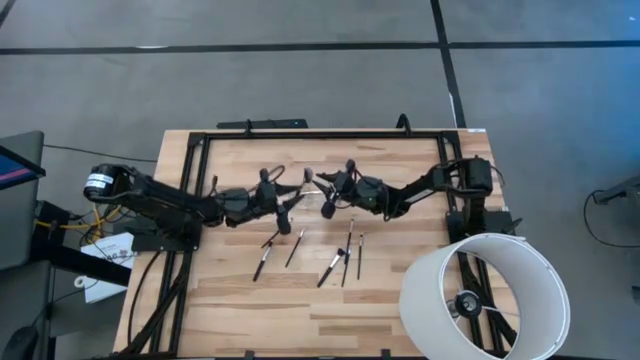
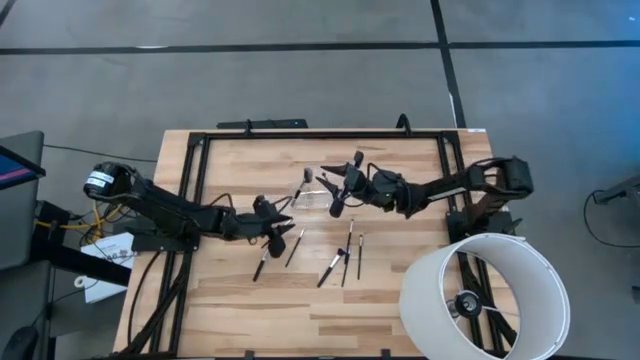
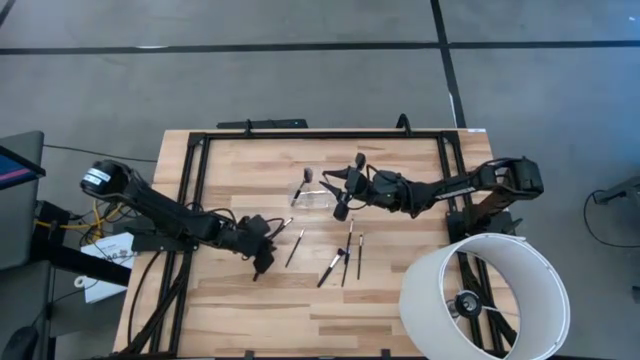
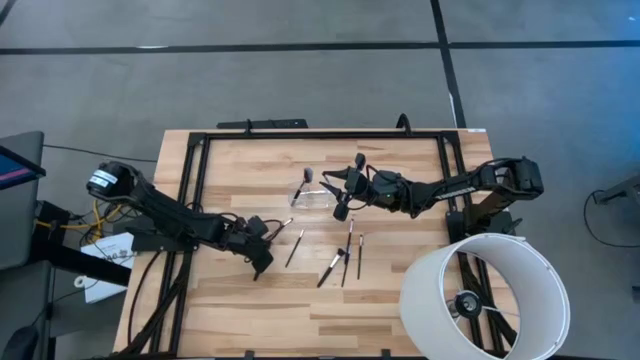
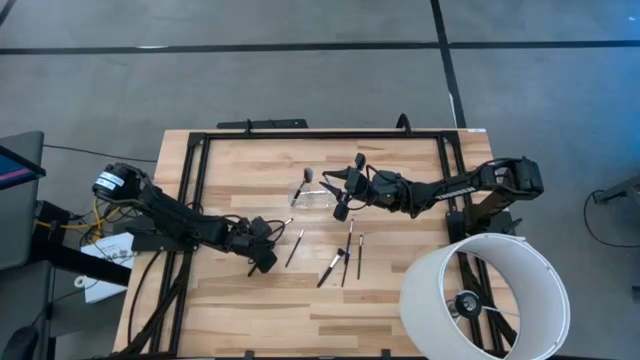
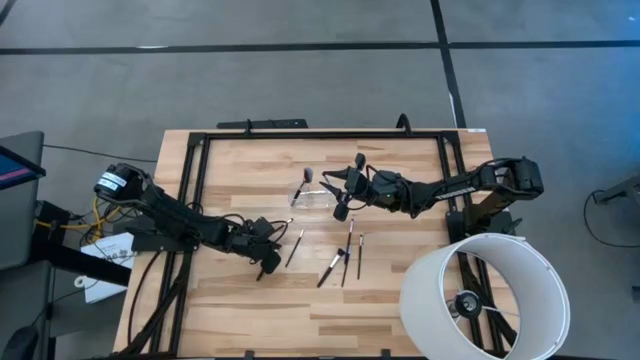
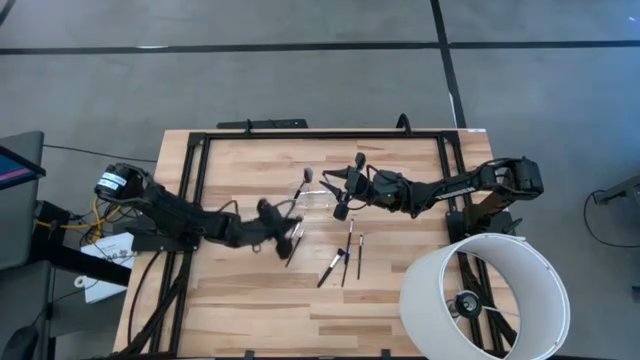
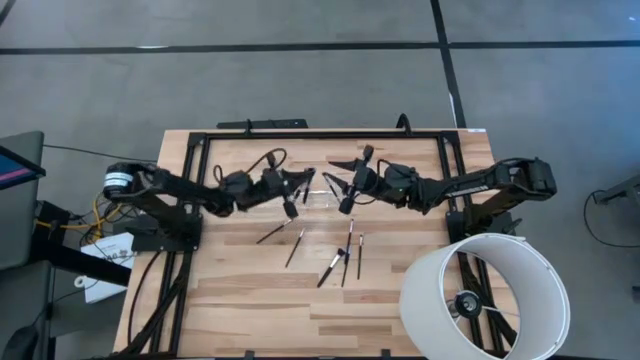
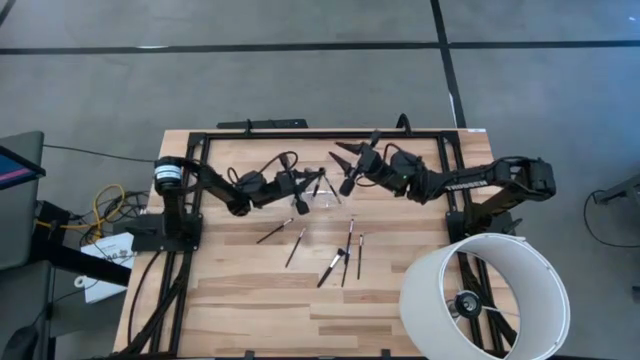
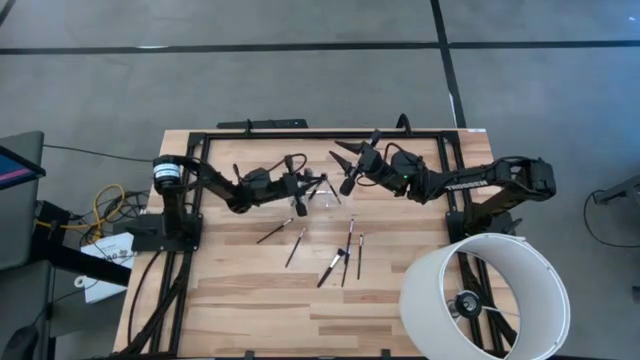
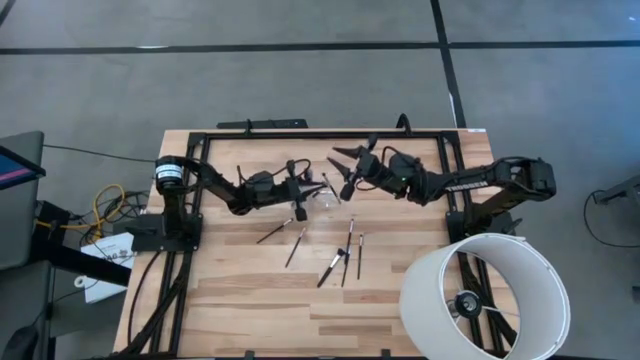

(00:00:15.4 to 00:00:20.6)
Task: Put items in baskets/containers
Put the powder brush into the transparent organizer

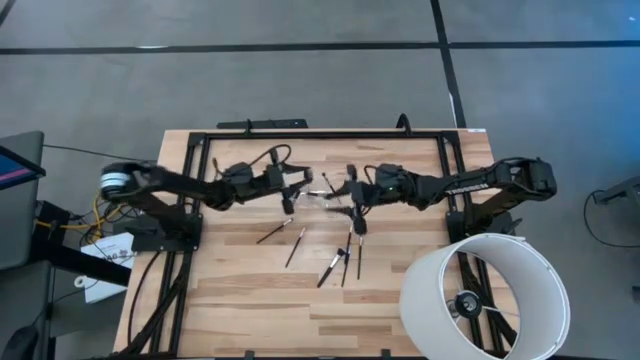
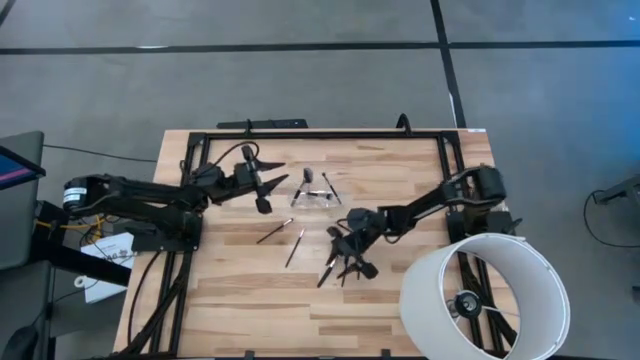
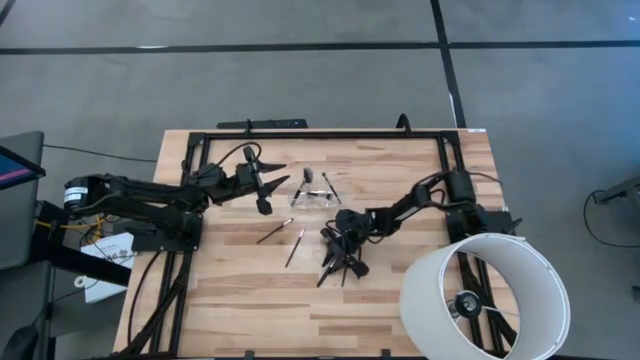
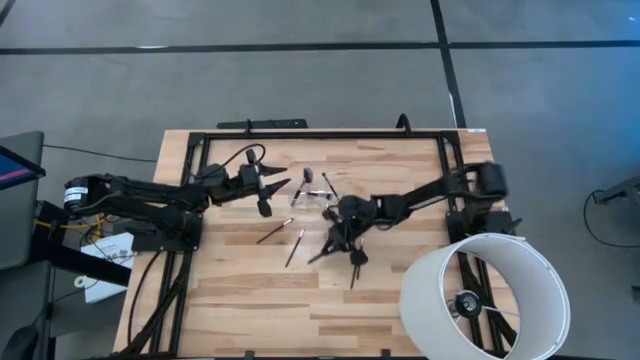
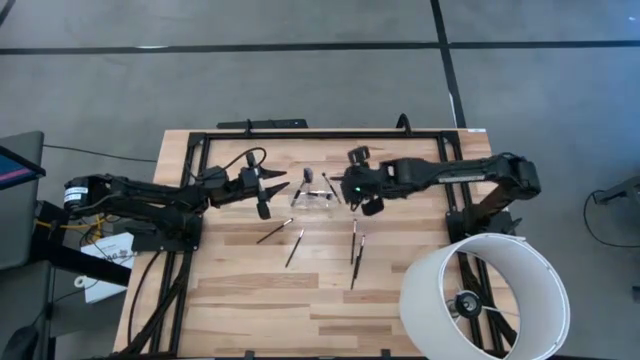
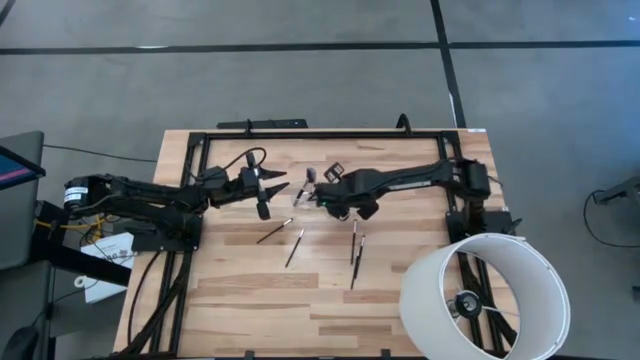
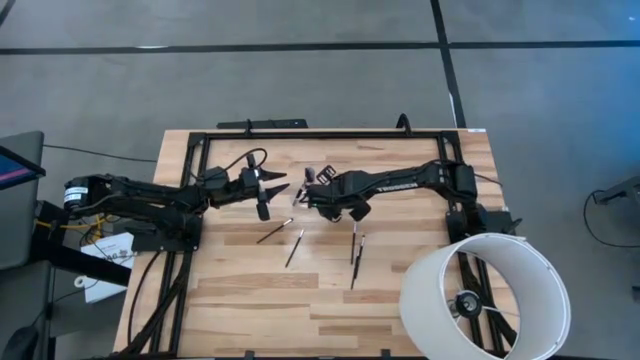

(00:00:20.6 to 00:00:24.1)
Put the powder brush into the transparent organizer

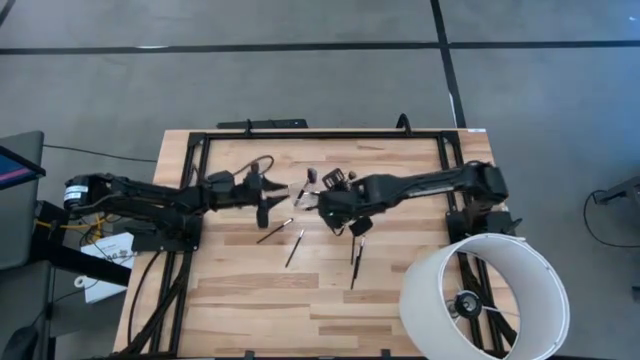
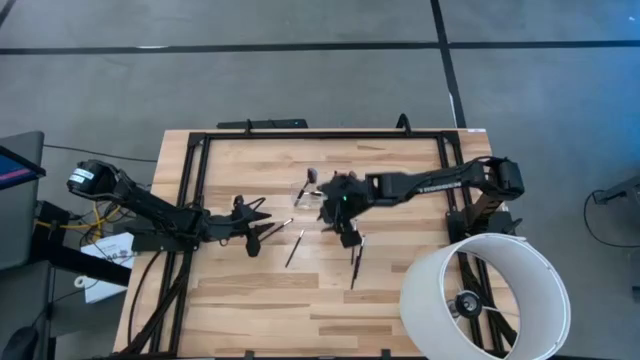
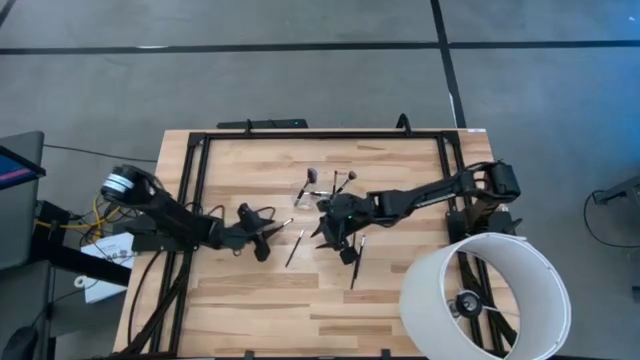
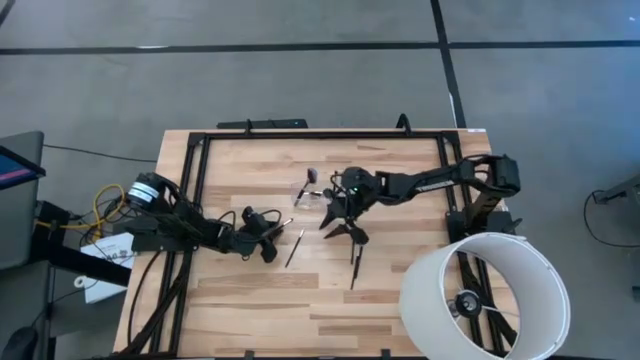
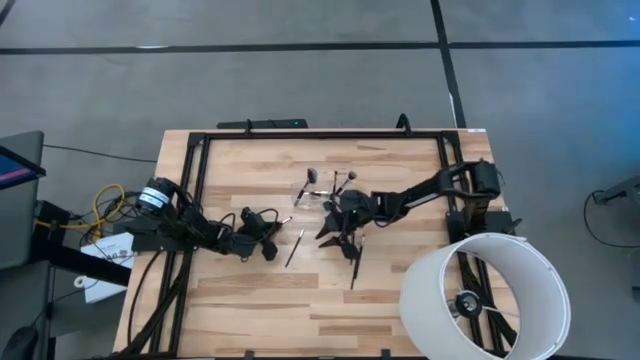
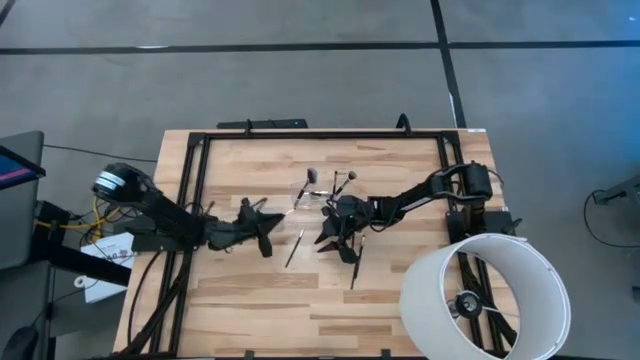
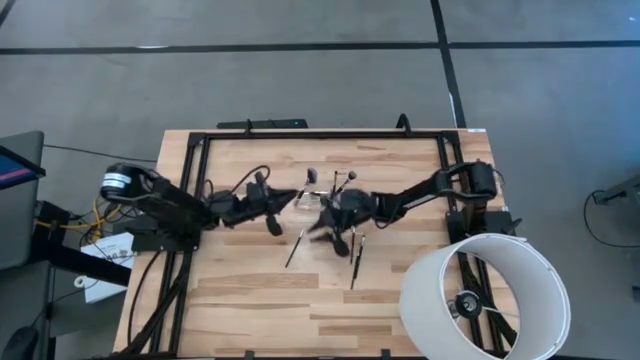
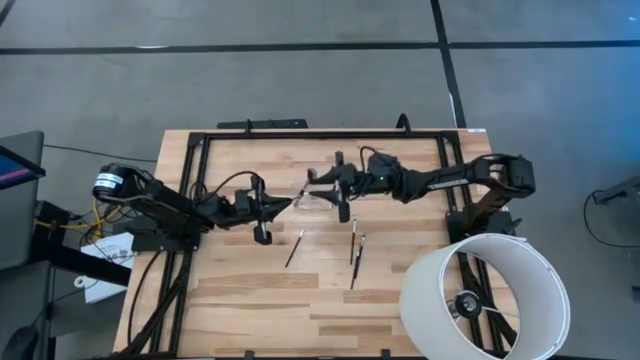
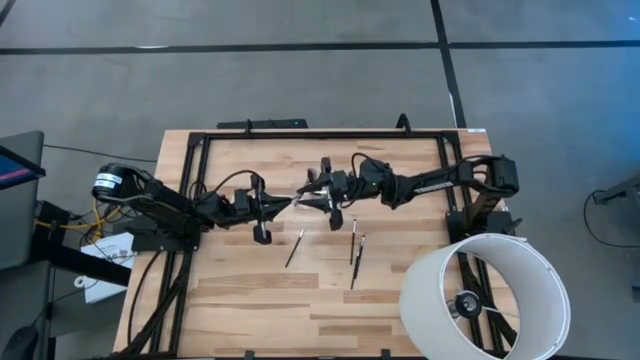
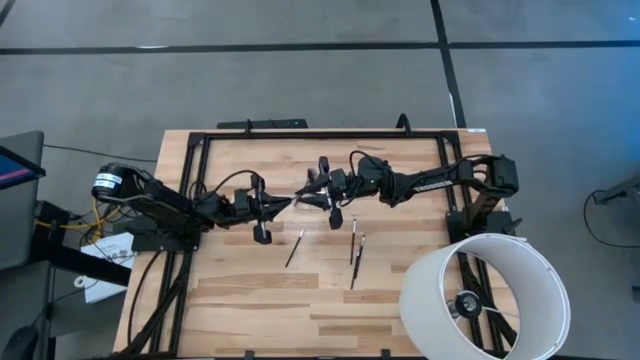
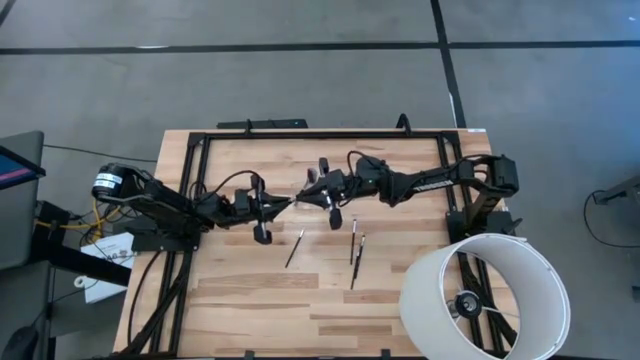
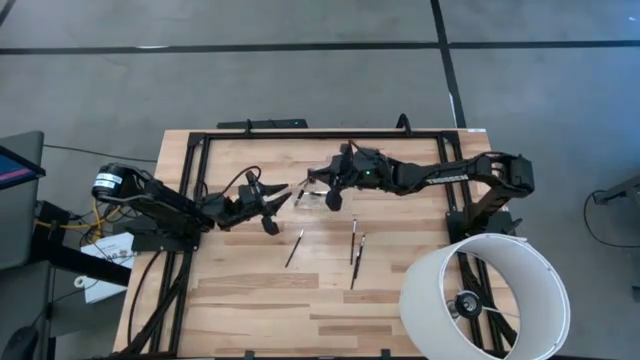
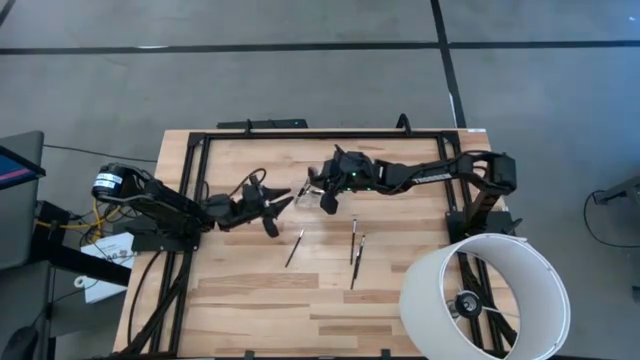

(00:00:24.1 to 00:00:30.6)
Put the eyeshadow brush into the transparent organizer

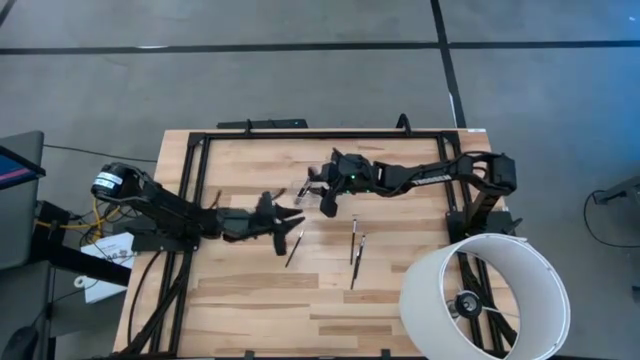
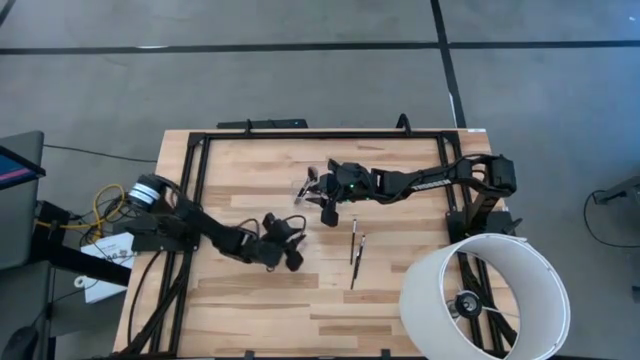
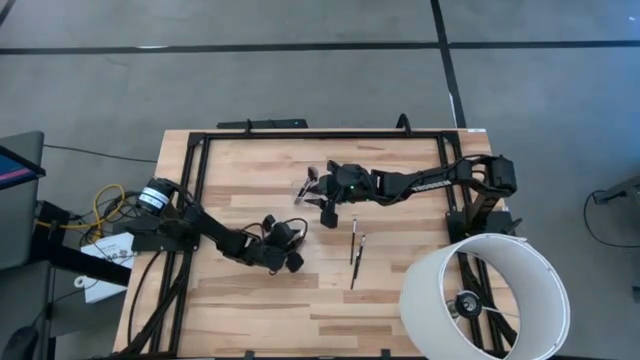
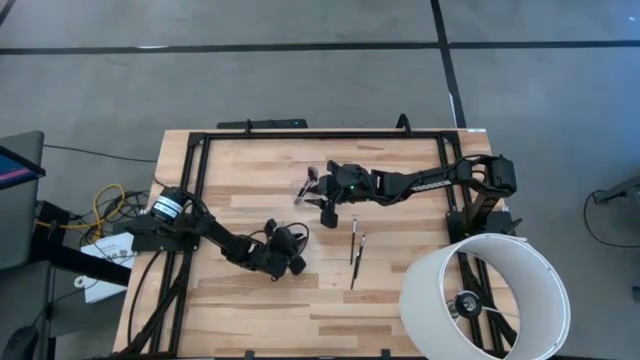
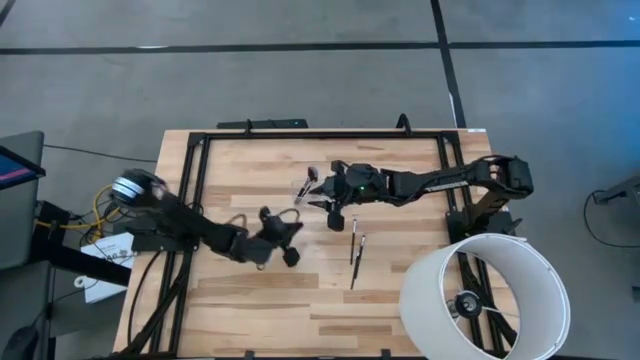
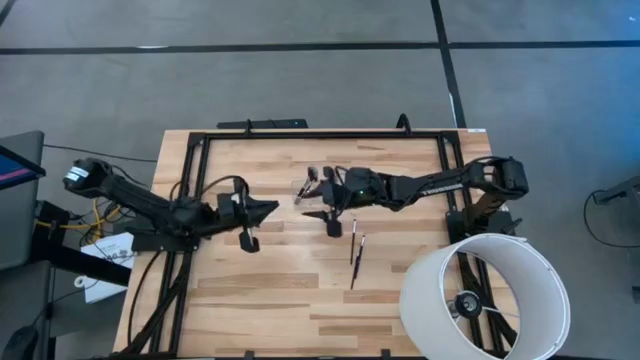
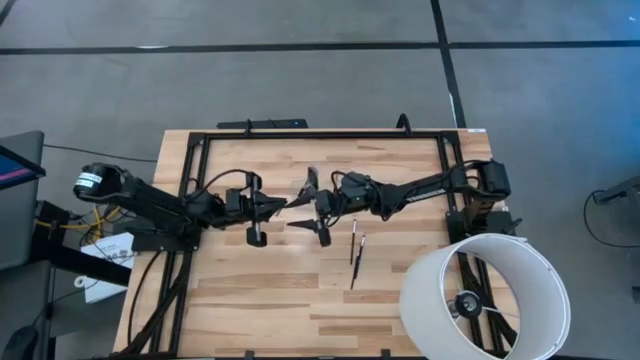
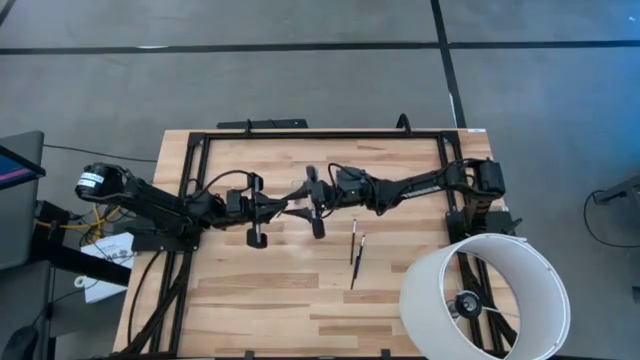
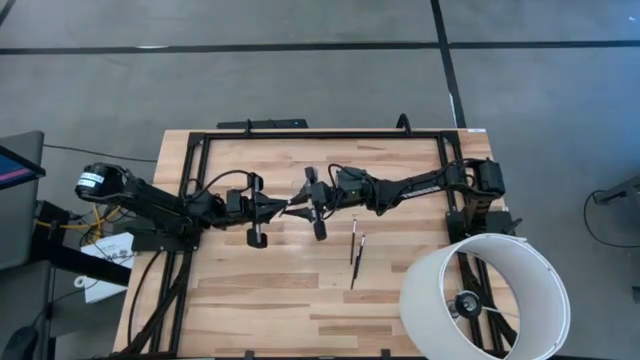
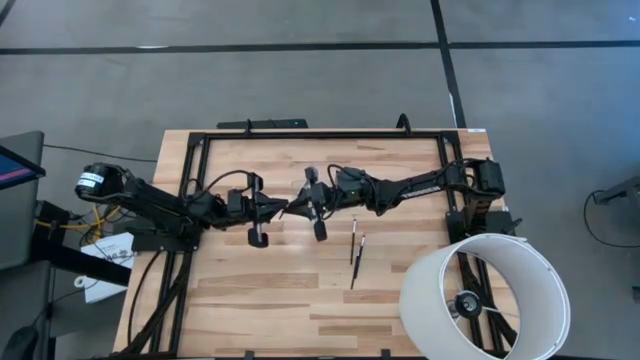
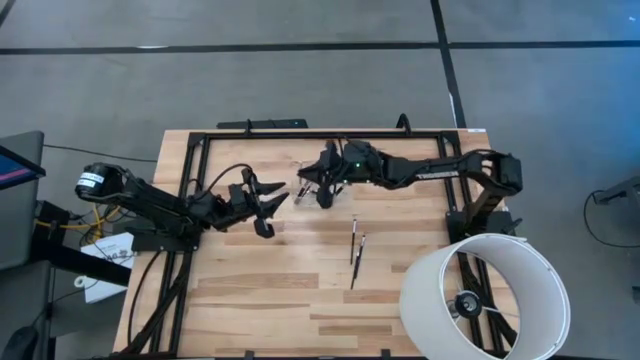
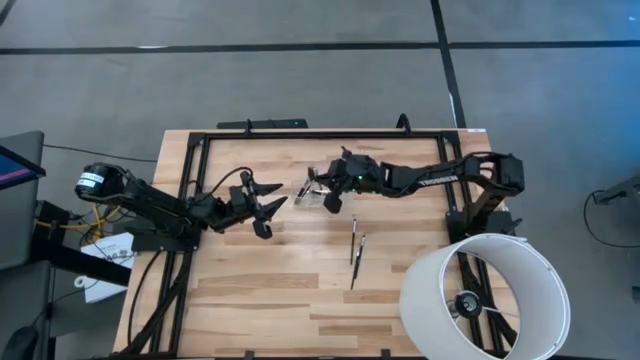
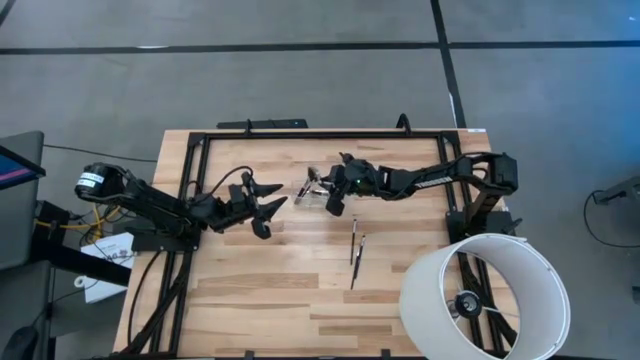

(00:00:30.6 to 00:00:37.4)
Put the eyeshadow brush into the transparent organizer
